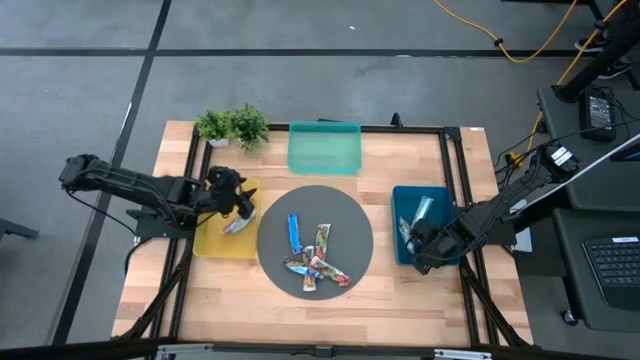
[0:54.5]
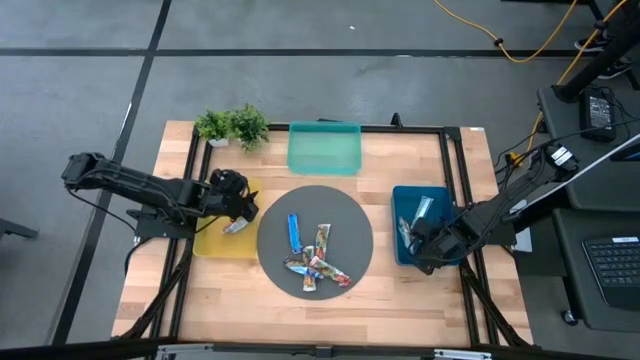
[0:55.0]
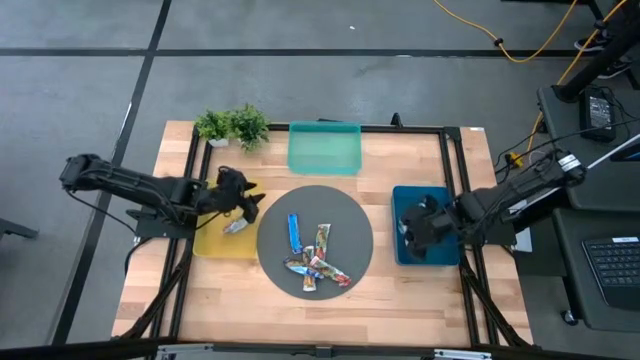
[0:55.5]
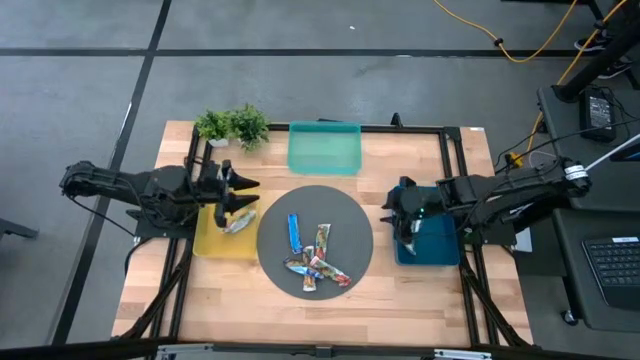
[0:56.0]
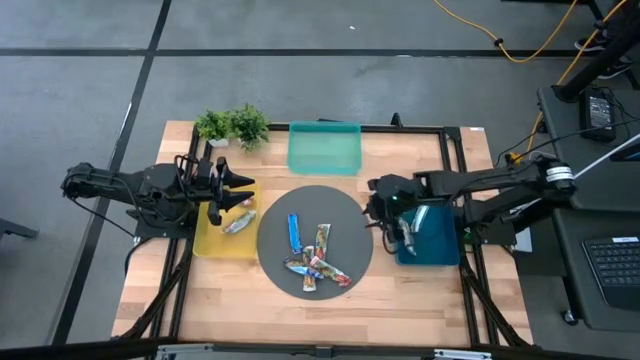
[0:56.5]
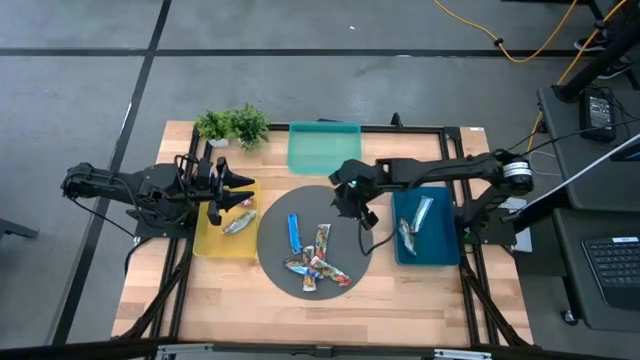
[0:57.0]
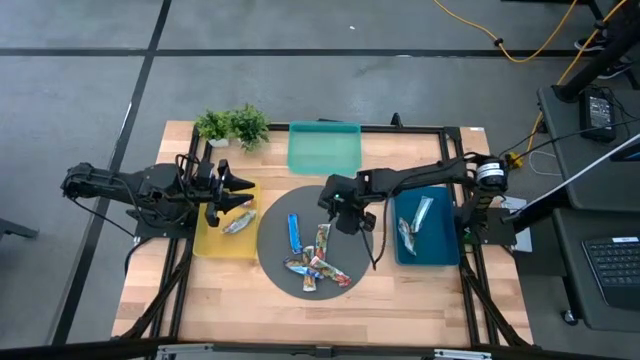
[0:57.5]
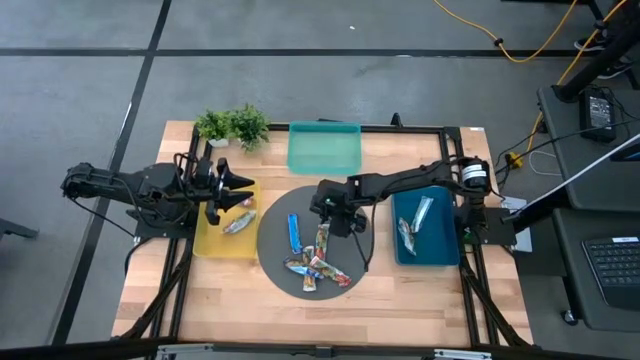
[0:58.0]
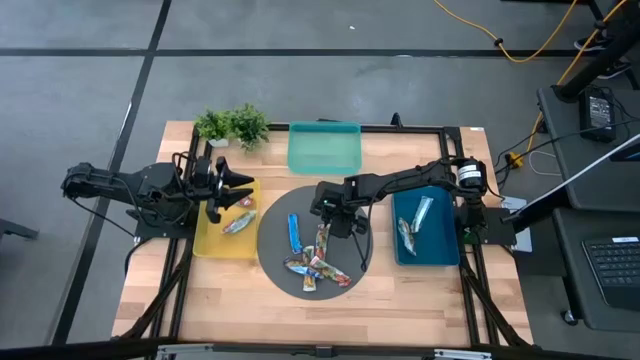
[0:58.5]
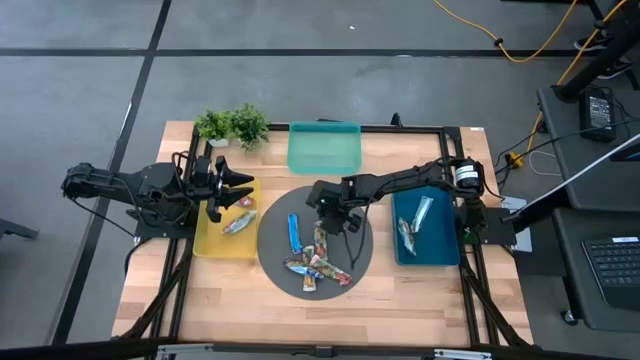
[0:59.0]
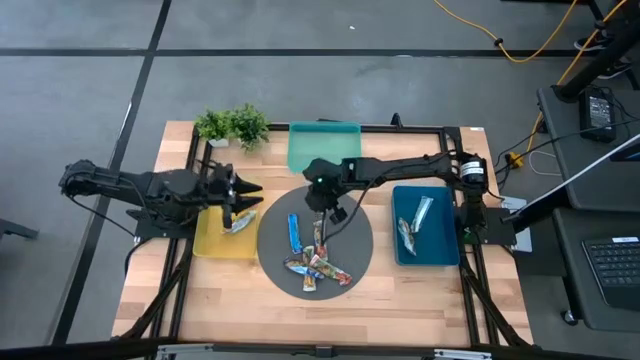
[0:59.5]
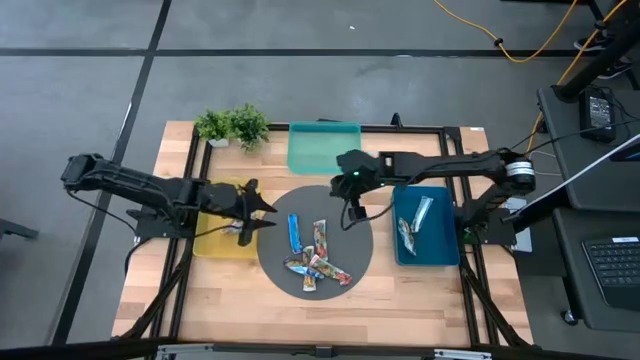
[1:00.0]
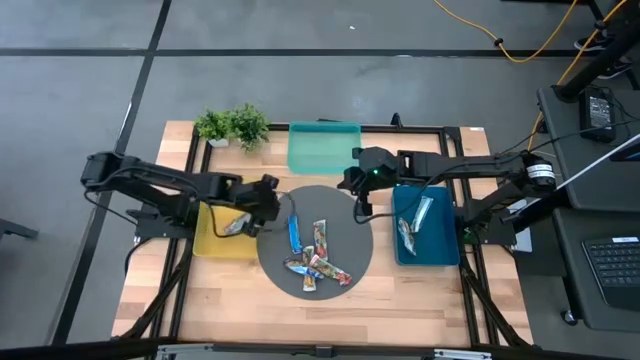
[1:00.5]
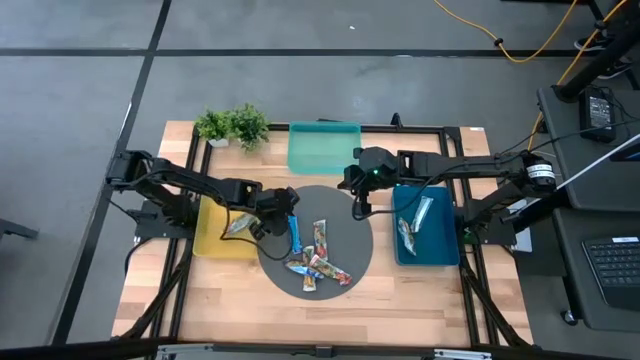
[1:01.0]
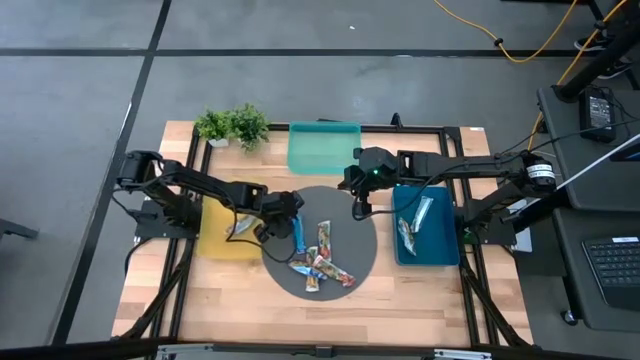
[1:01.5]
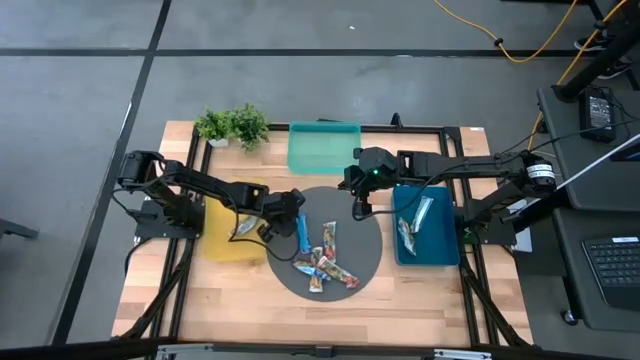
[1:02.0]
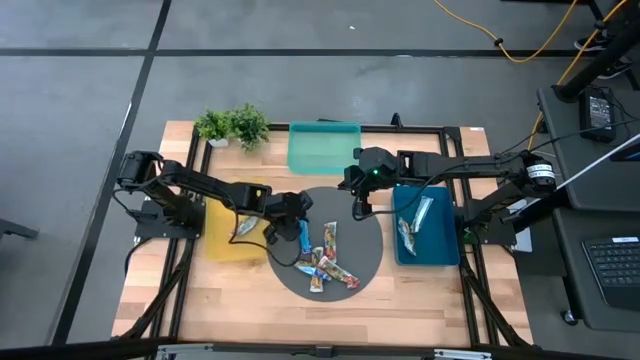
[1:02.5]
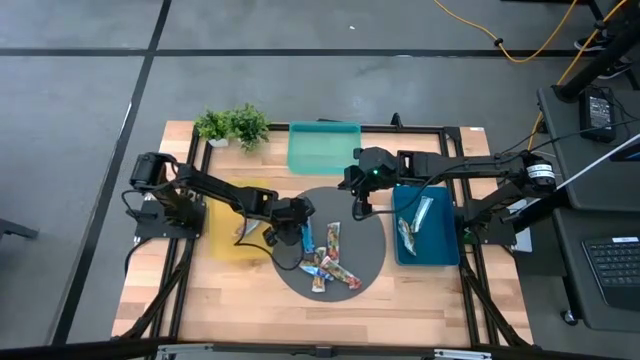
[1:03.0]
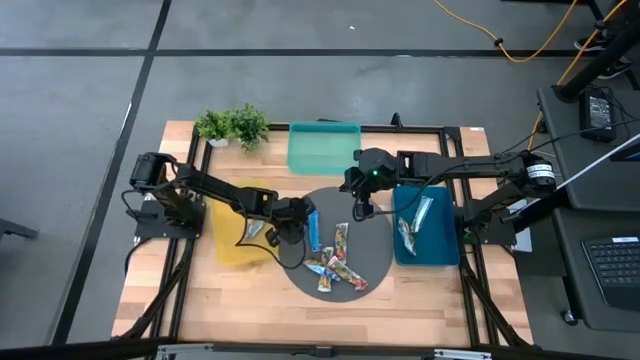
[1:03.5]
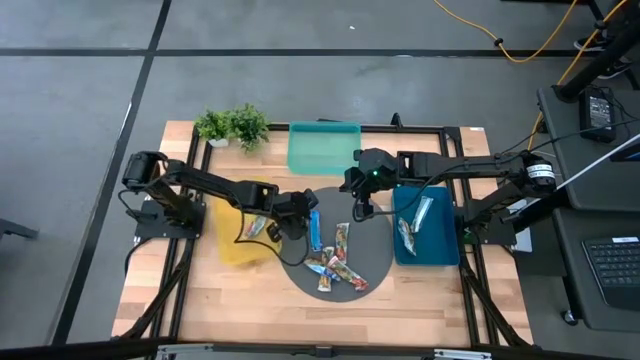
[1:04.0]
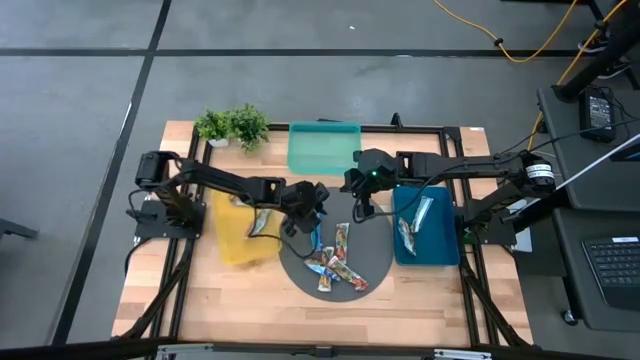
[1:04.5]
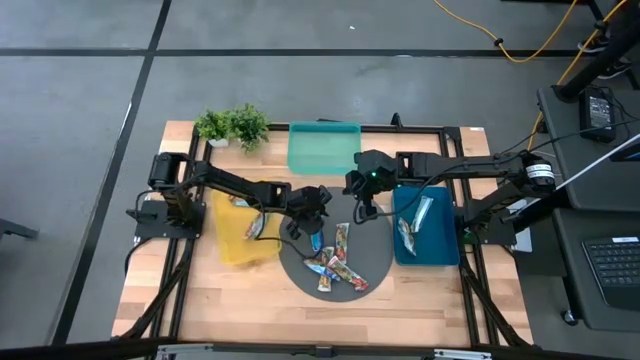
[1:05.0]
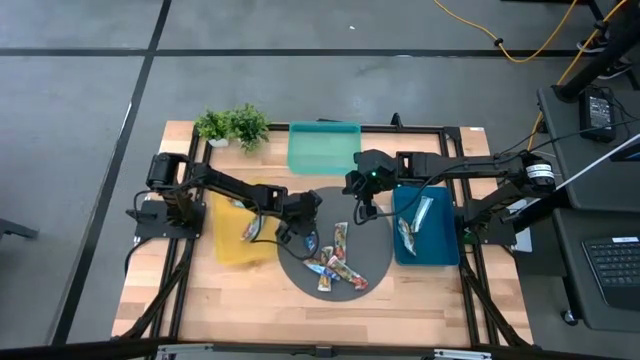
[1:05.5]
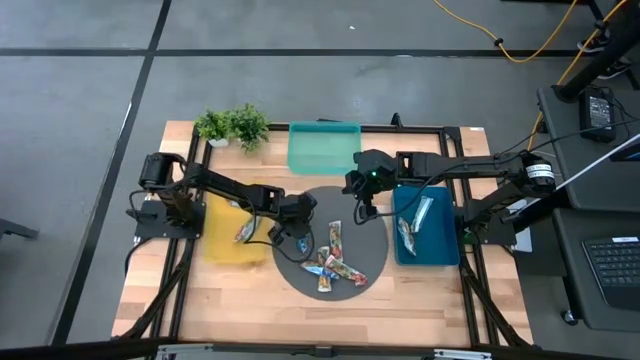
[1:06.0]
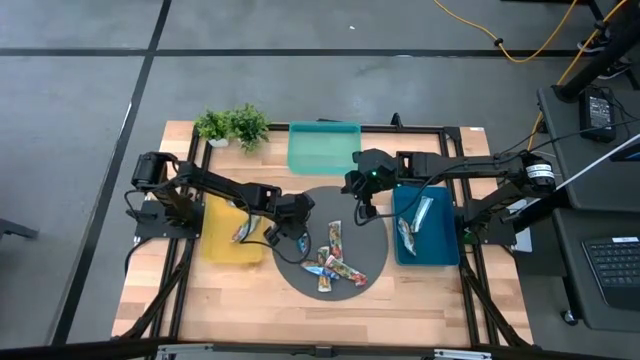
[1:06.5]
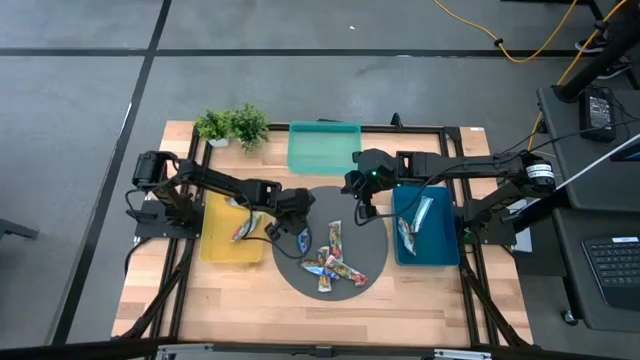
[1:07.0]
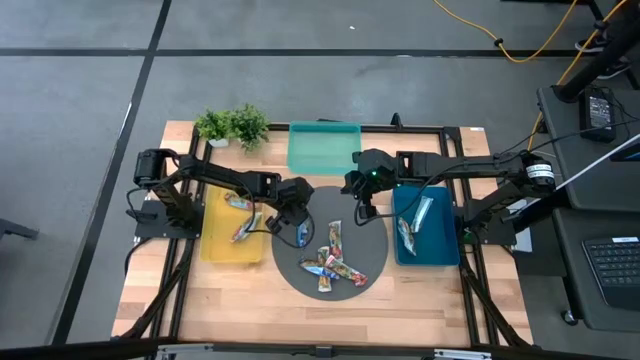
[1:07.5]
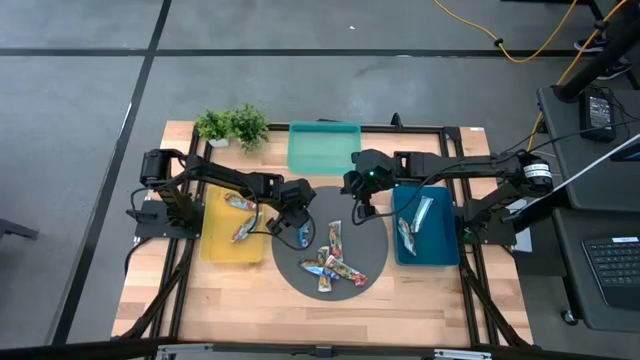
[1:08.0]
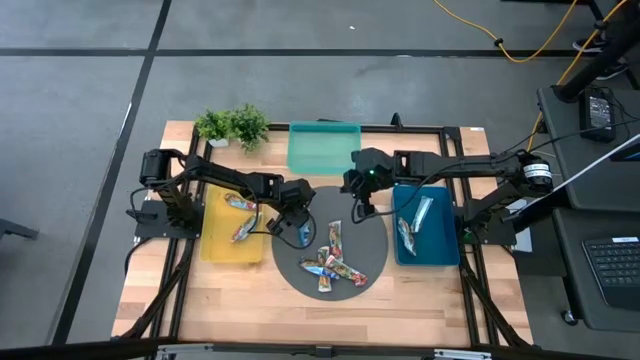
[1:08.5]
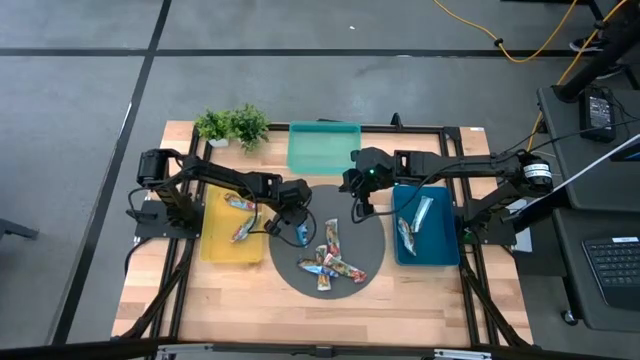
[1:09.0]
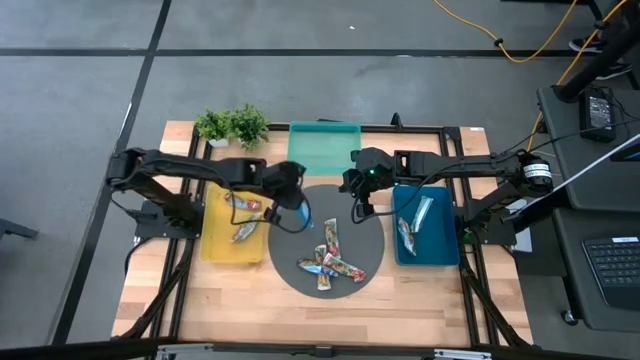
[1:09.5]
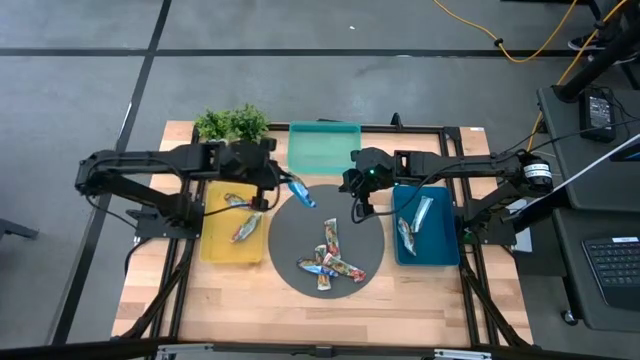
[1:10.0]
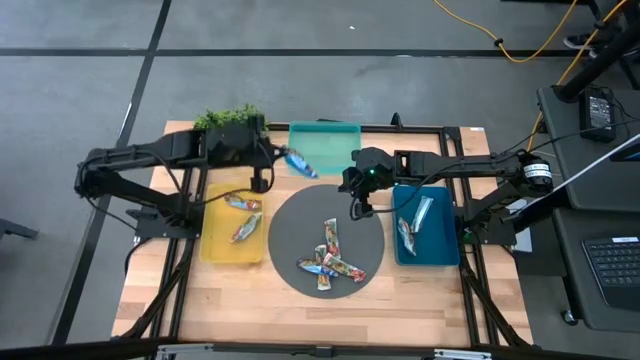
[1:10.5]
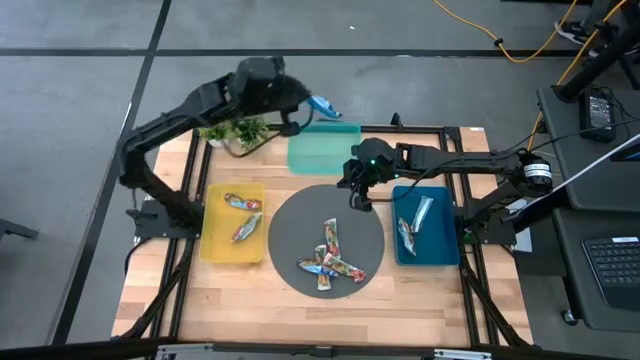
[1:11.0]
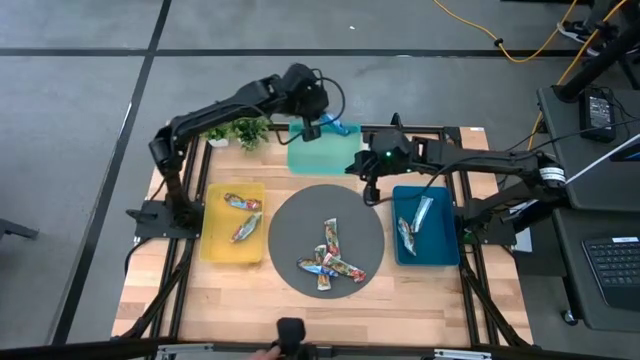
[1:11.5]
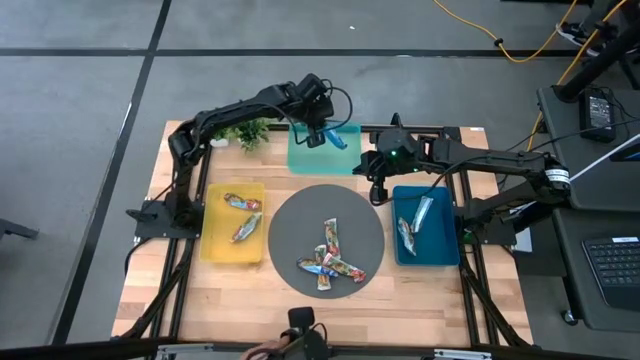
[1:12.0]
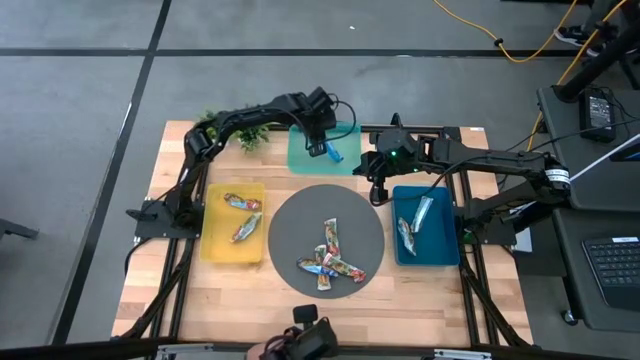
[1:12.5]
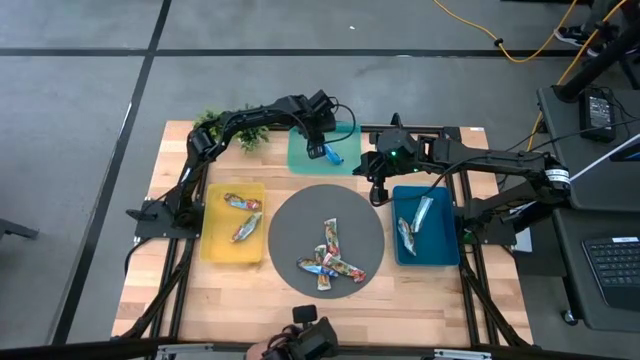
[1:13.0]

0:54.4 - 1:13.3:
Task: Pick and place Granola Bars by type
Put the blue granola bar into the green bin

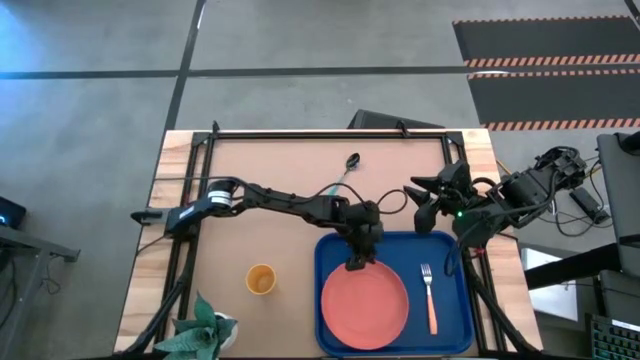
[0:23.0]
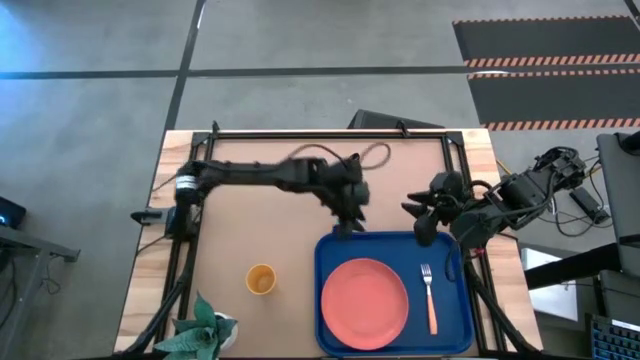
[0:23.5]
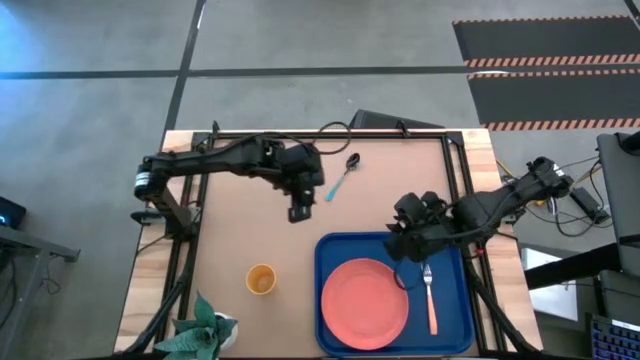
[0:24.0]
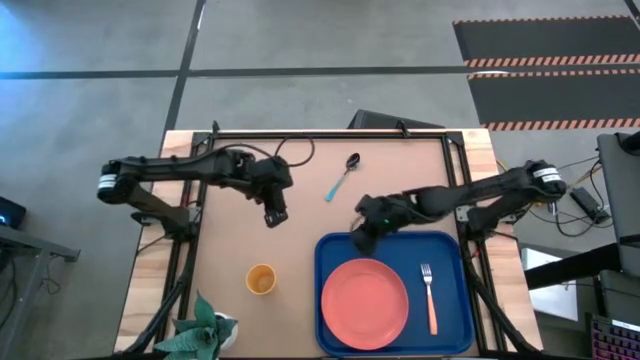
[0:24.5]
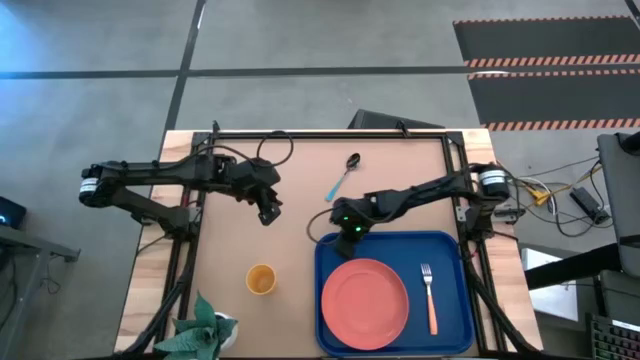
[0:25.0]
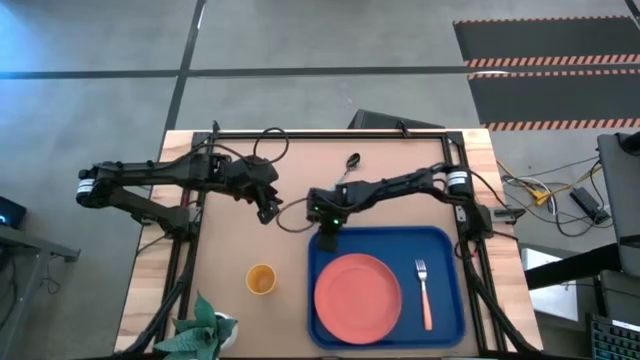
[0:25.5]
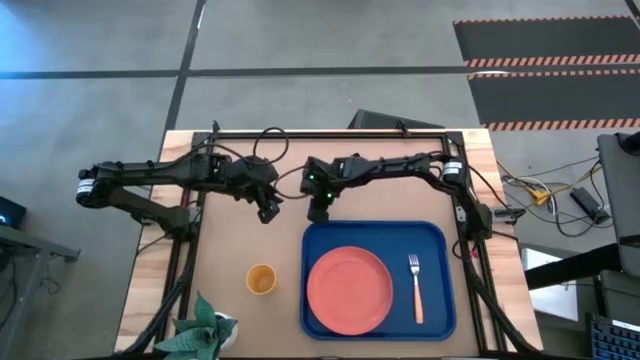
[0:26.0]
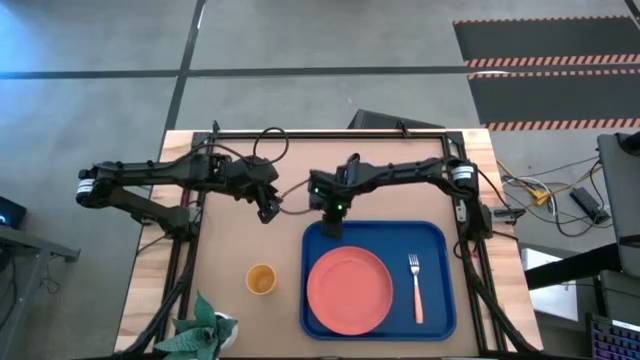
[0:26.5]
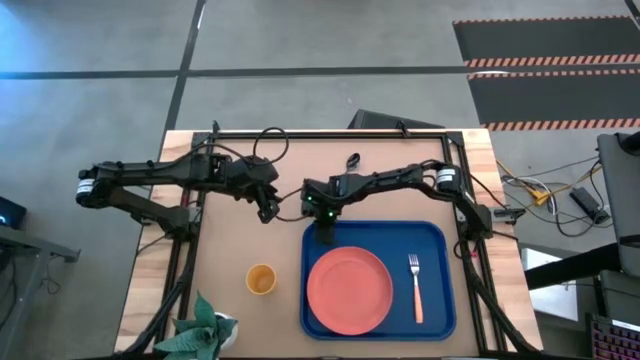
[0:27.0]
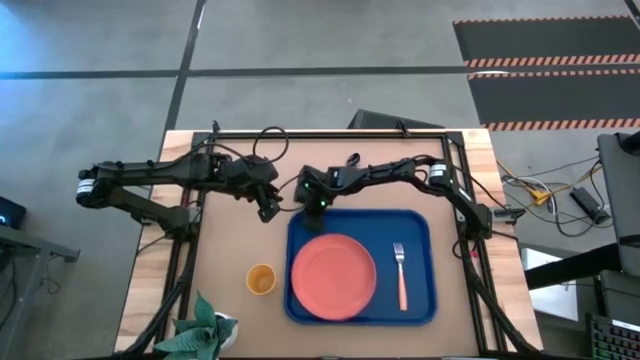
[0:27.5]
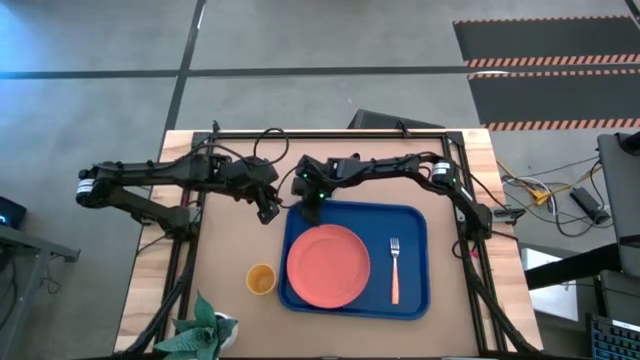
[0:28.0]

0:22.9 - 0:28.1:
Task: Pick and place plate/cup/fork/spoon on tray
Move the blue tray to the center of the table
